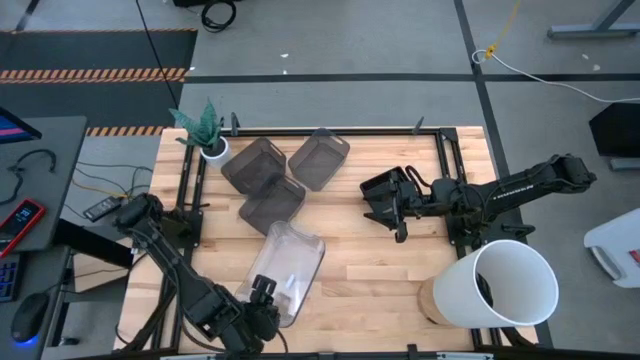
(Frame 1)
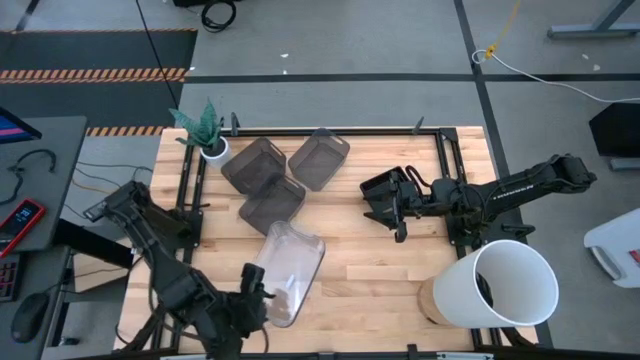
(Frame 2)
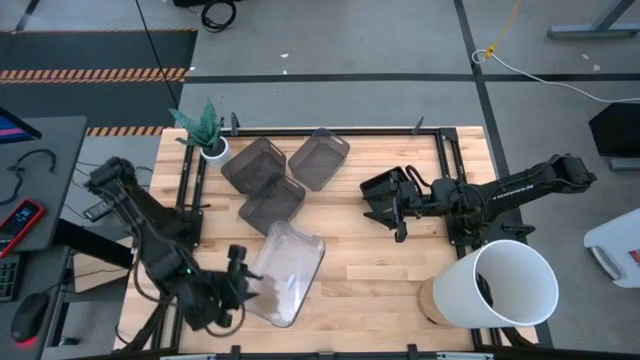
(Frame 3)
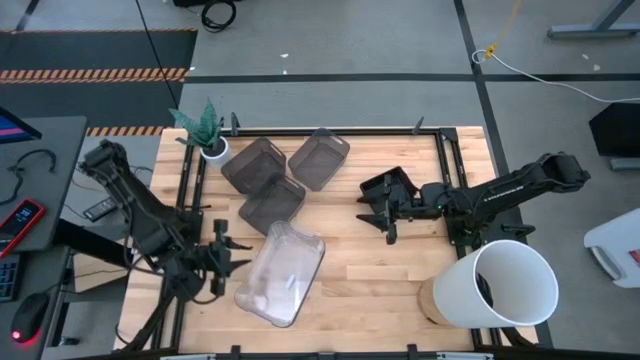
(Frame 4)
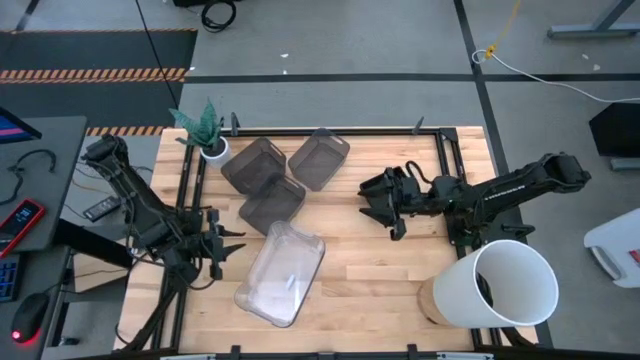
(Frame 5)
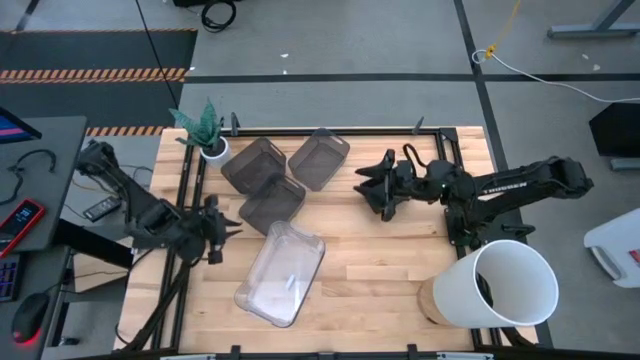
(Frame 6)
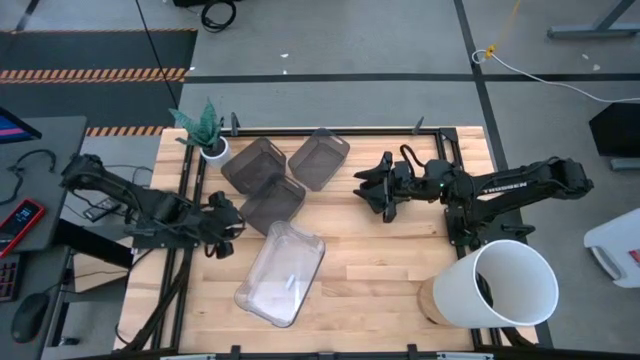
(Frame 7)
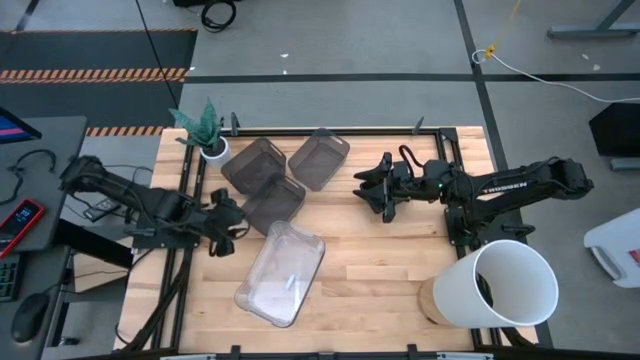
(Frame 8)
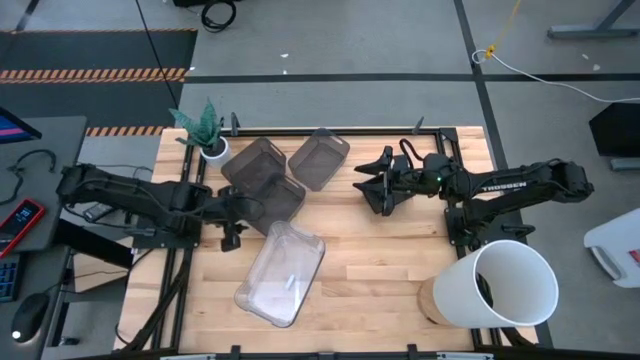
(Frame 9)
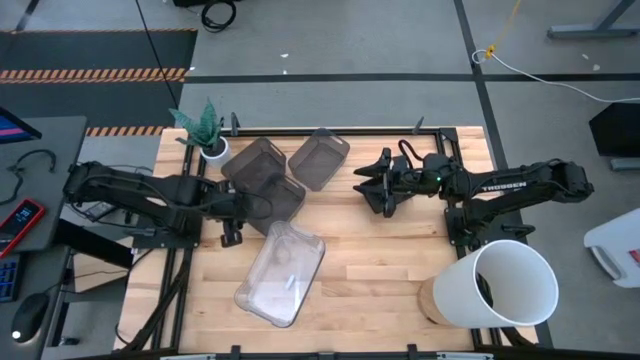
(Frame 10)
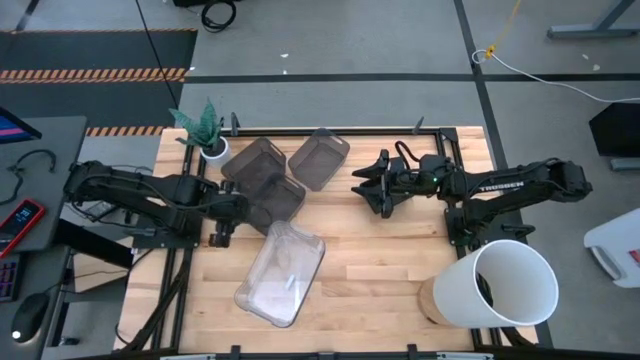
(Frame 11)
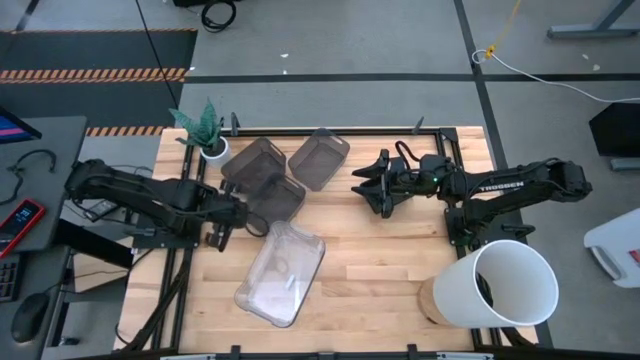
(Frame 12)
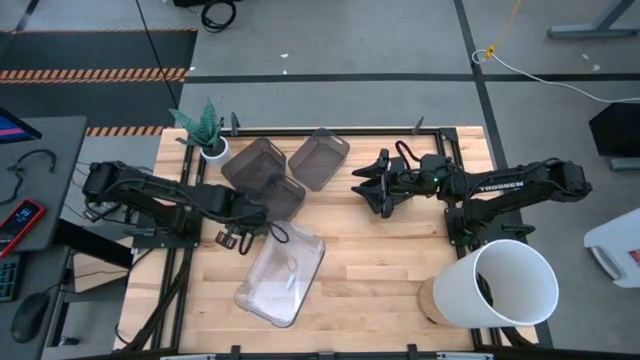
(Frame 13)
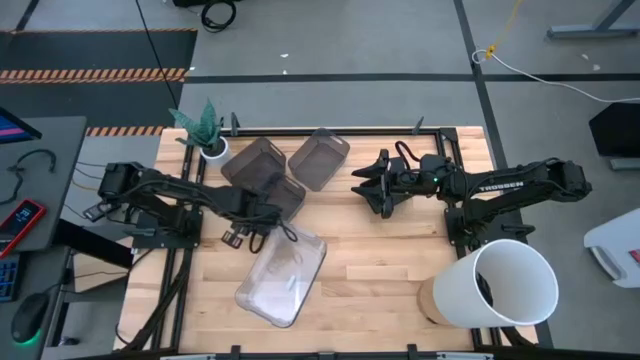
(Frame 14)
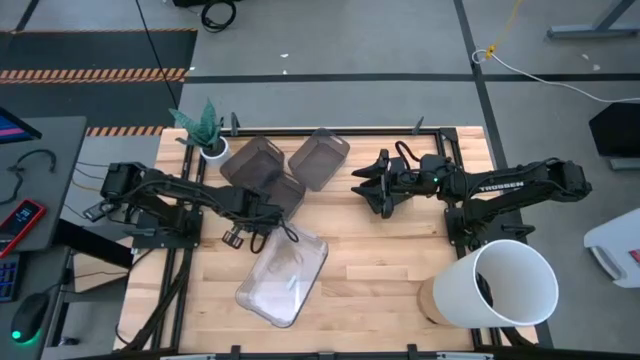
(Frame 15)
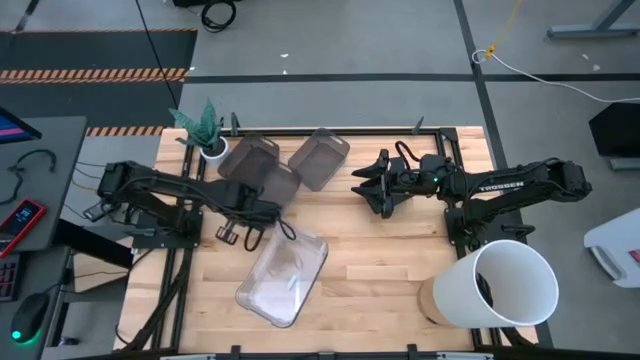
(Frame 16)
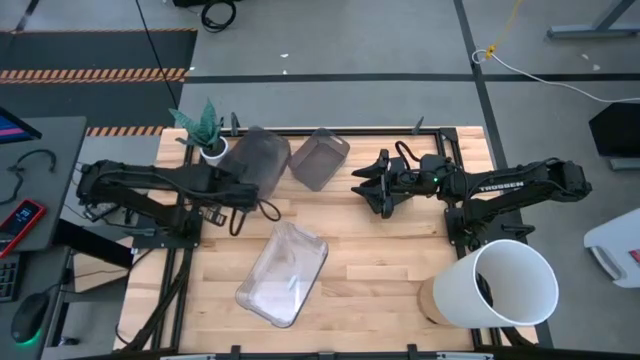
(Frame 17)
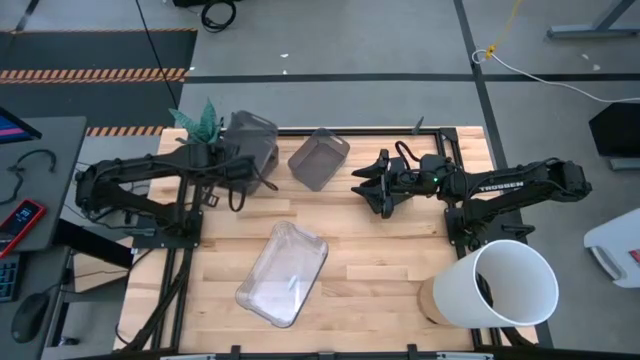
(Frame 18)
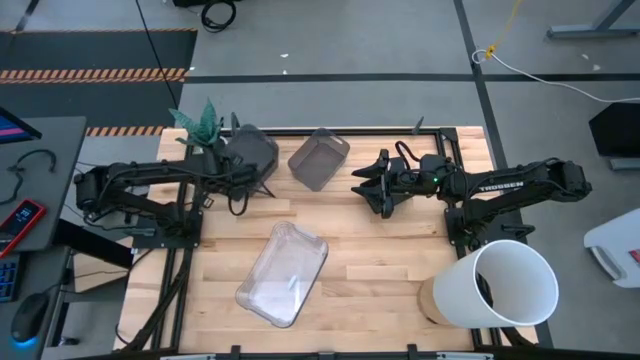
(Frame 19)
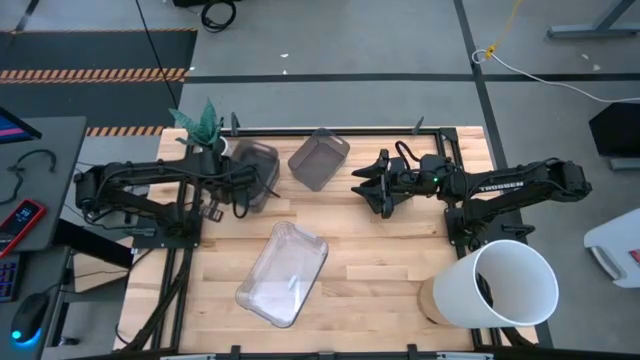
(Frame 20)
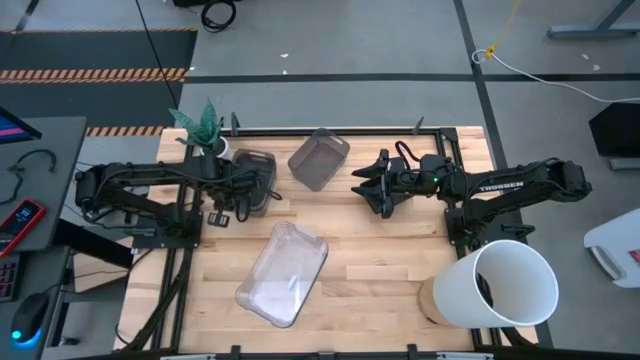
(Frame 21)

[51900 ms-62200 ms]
Stack the bottom black bin on top of the top left black bin

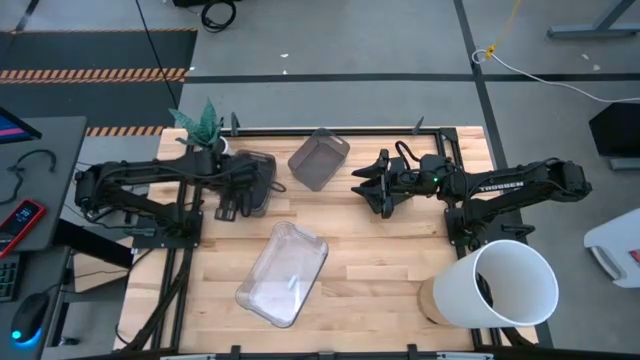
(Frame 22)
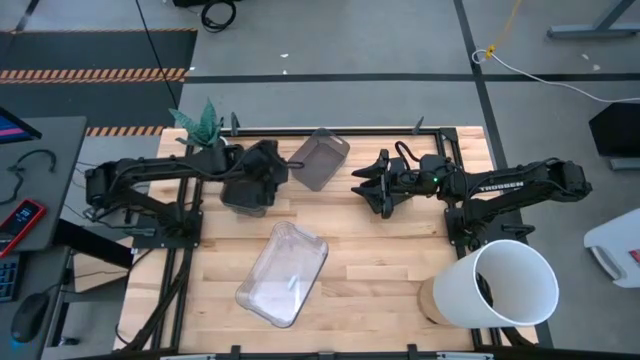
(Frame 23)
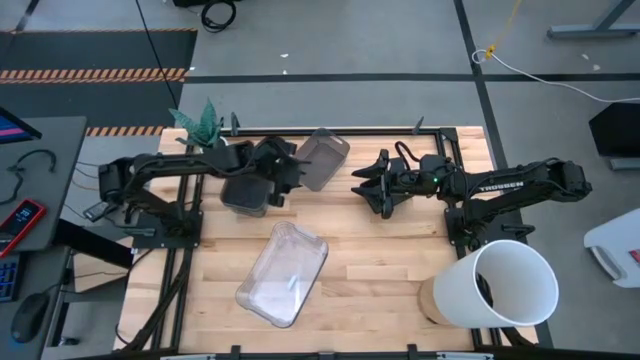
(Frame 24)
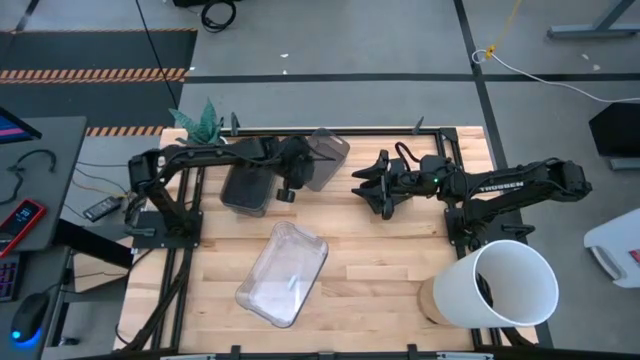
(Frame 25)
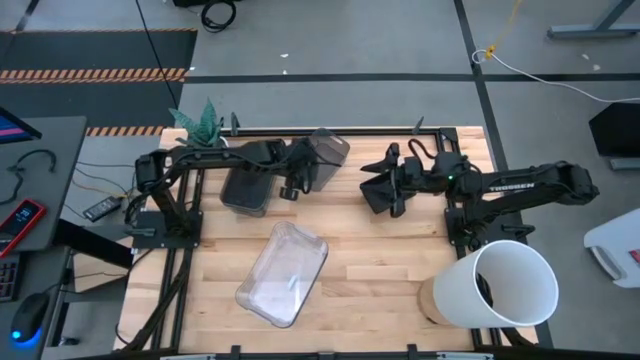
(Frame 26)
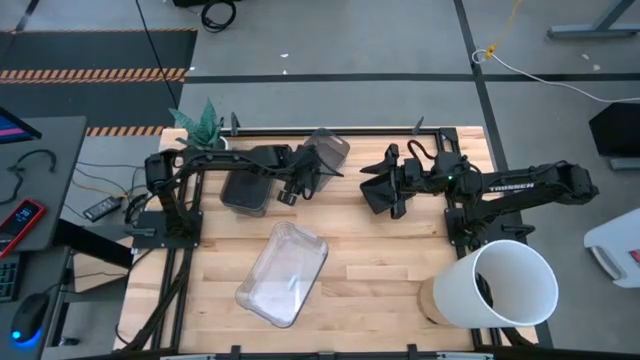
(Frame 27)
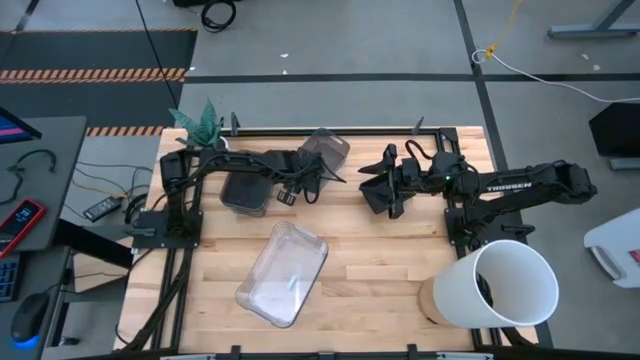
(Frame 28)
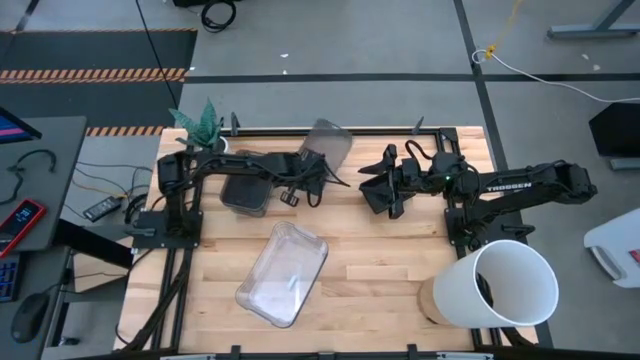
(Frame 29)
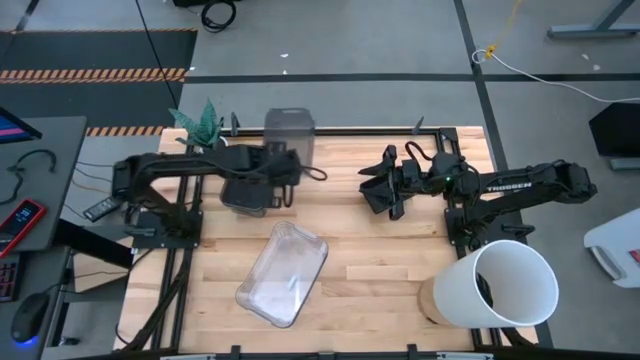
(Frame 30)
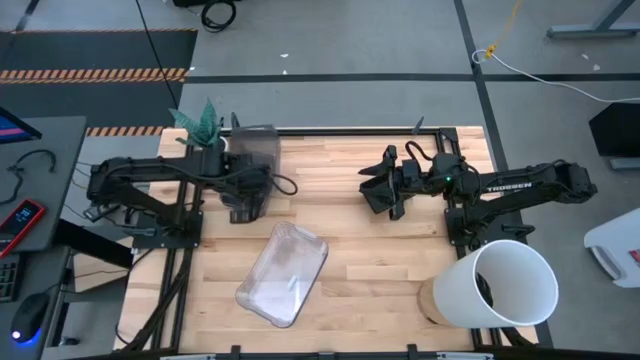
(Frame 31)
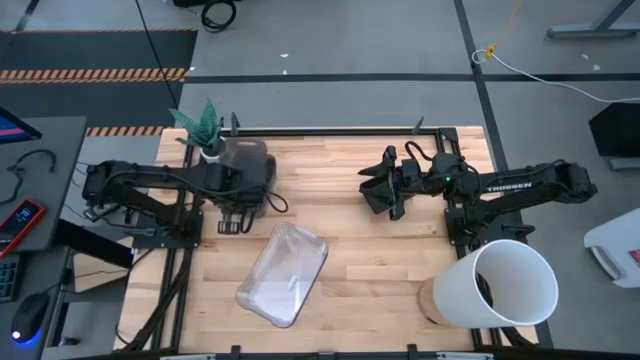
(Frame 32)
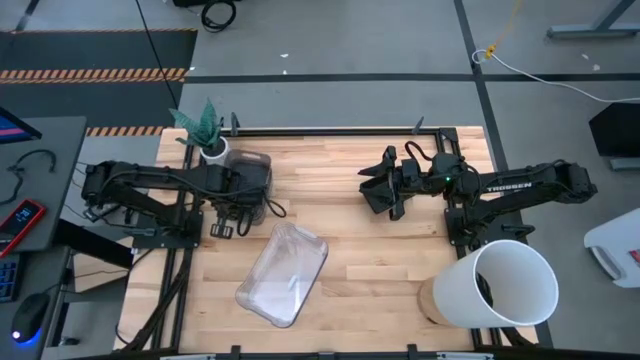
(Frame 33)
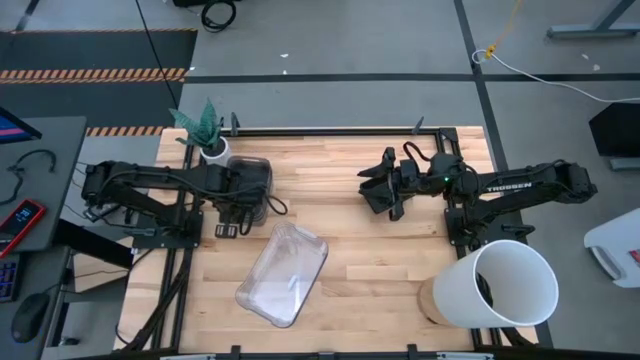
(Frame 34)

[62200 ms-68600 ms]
Stack the black bin on top of the black bins

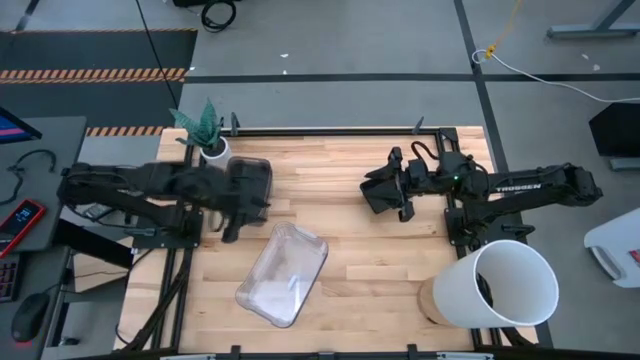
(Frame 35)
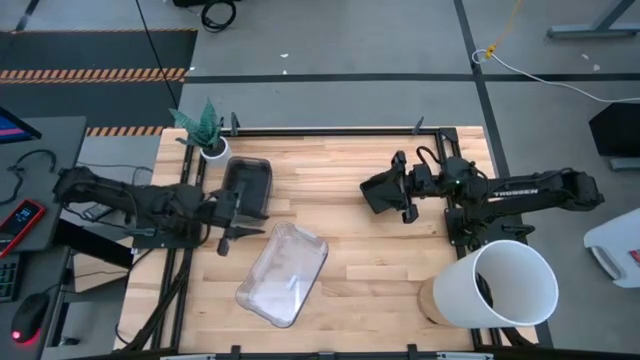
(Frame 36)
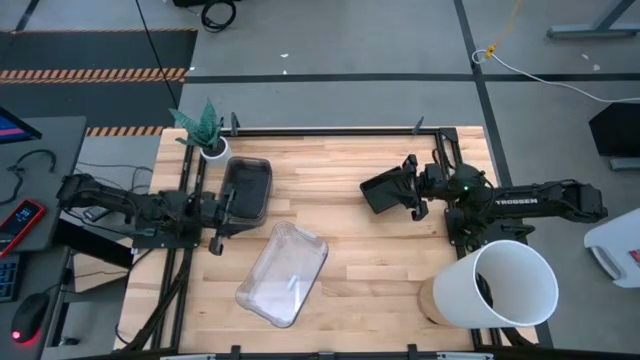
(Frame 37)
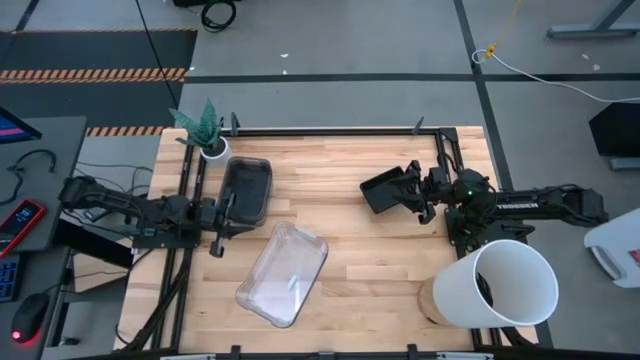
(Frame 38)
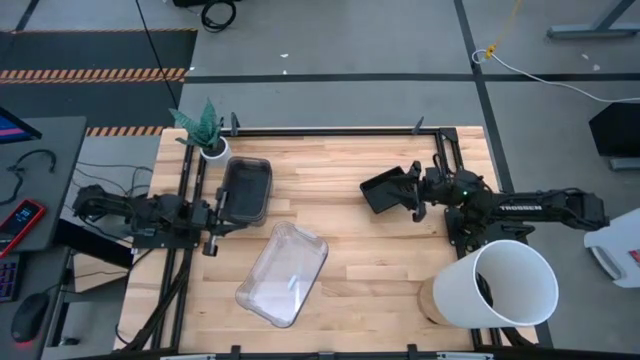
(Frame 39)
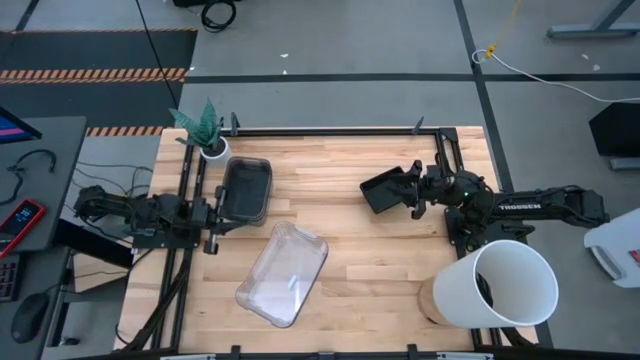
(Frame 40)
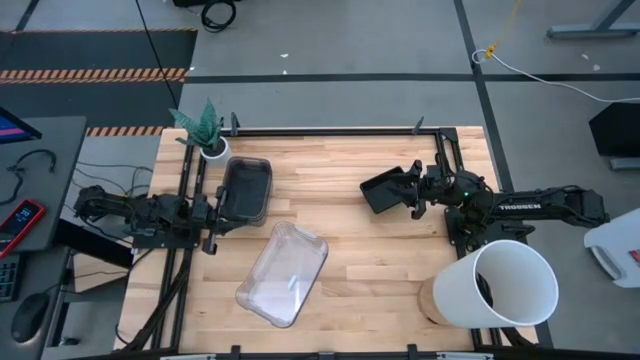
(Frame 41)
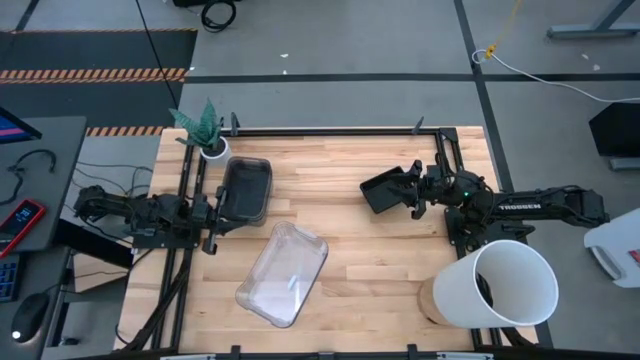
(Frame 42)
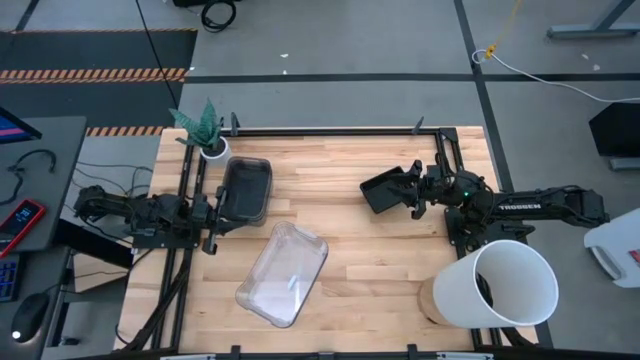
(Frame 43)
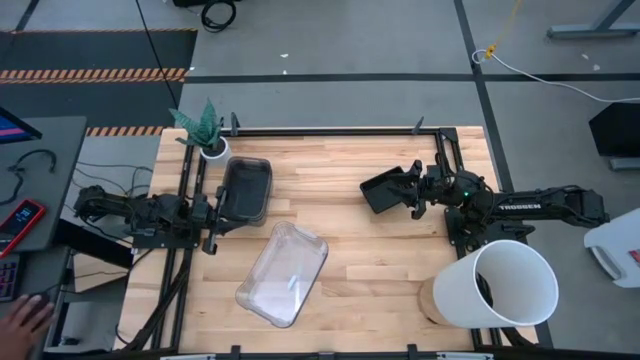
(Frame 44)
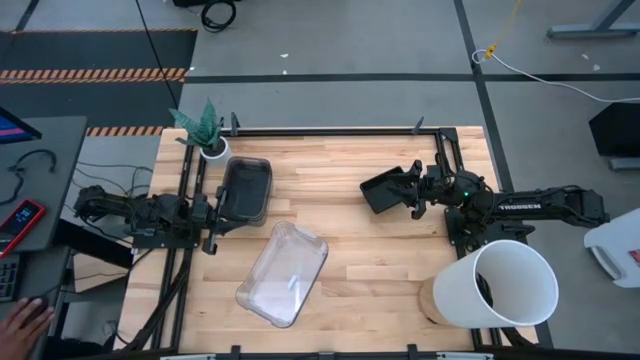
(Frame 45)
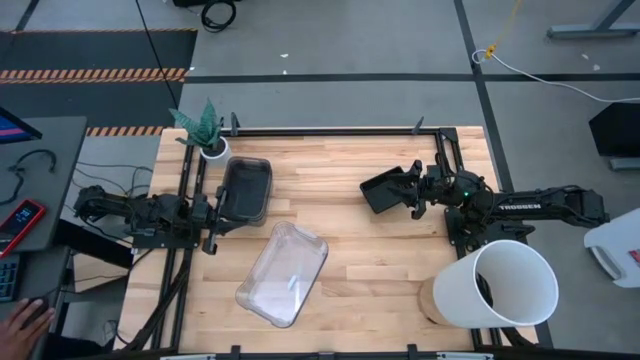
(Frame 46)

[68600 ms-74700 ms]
Return to Home Position
